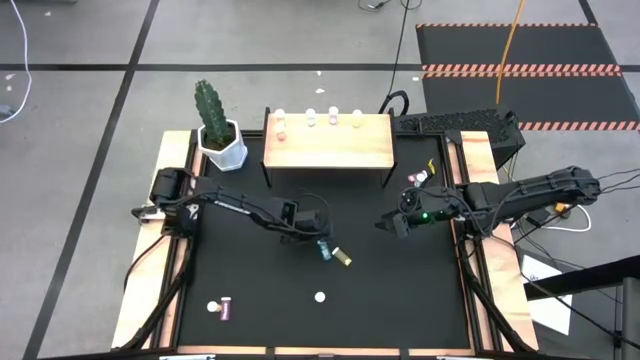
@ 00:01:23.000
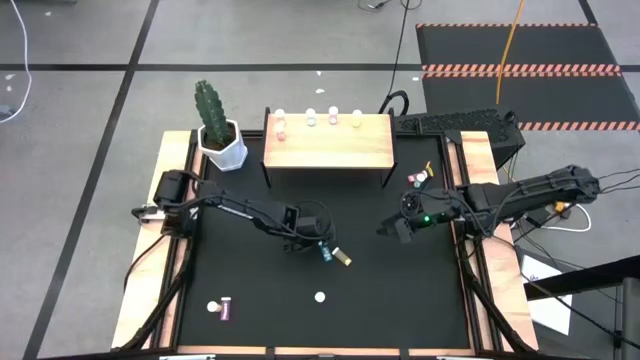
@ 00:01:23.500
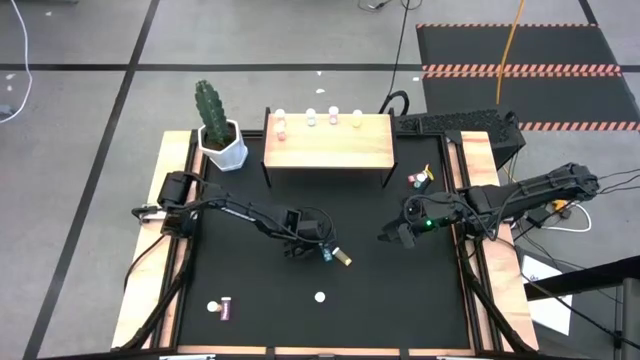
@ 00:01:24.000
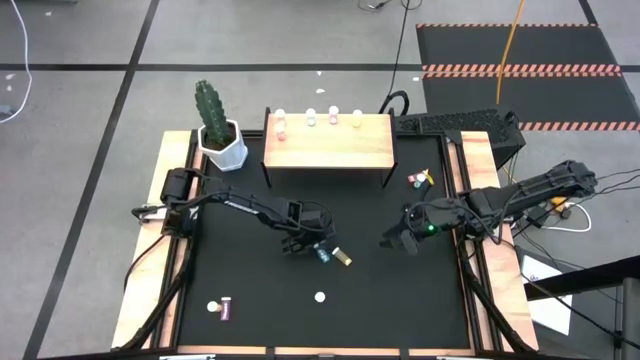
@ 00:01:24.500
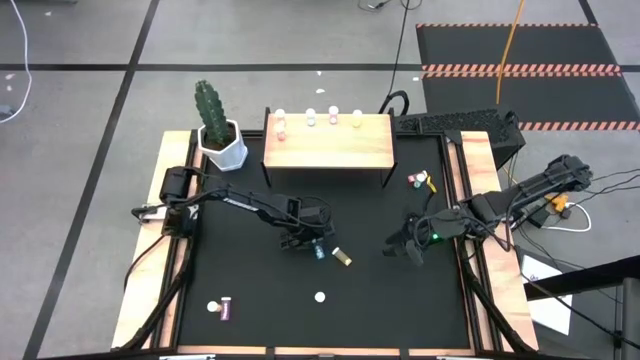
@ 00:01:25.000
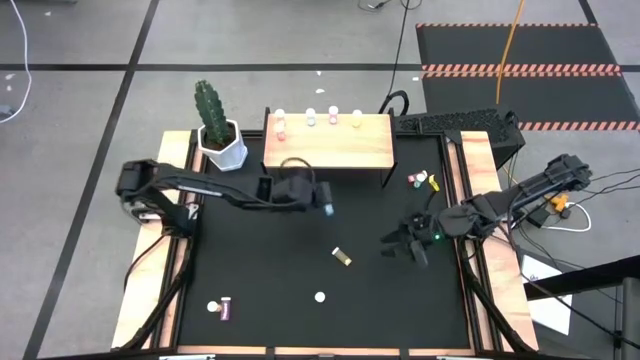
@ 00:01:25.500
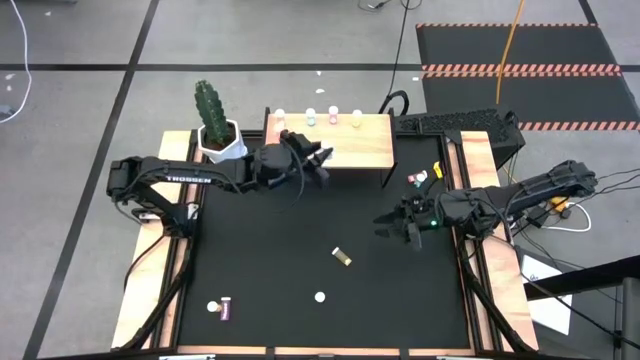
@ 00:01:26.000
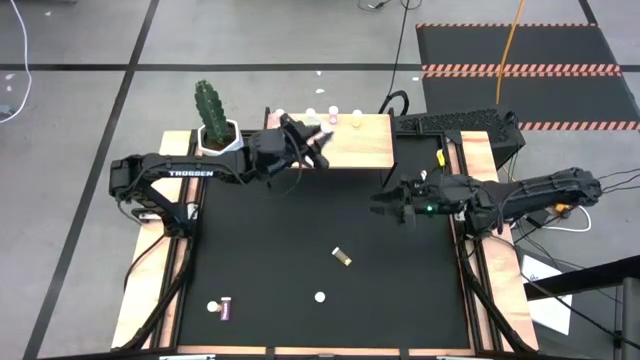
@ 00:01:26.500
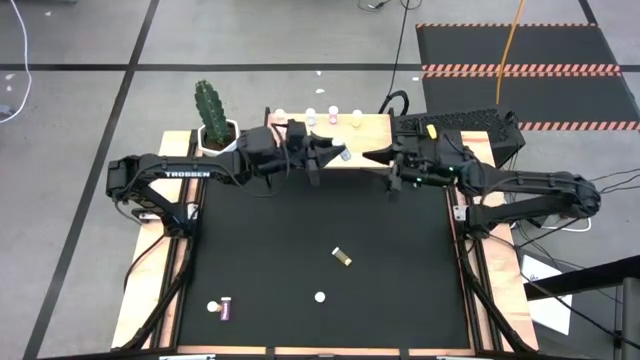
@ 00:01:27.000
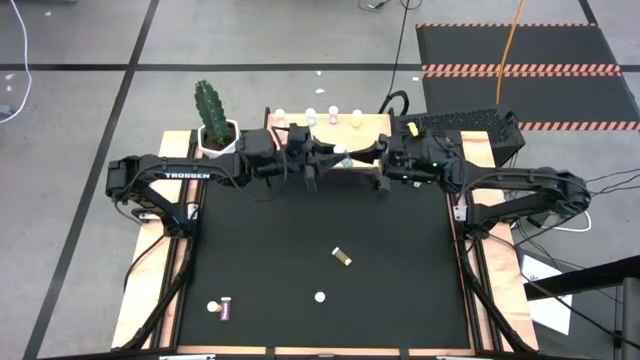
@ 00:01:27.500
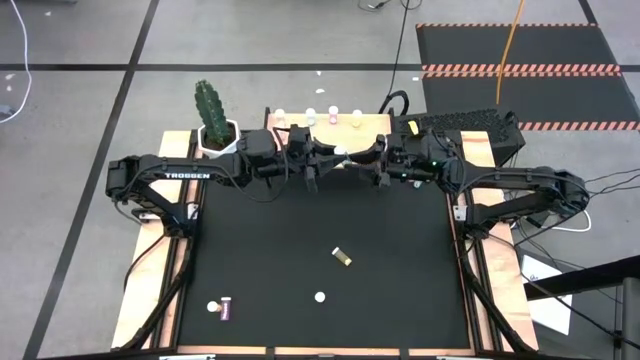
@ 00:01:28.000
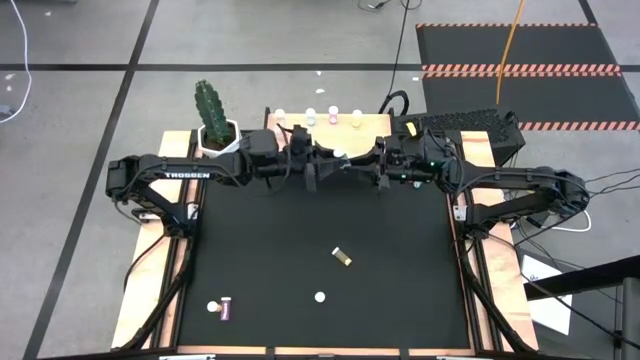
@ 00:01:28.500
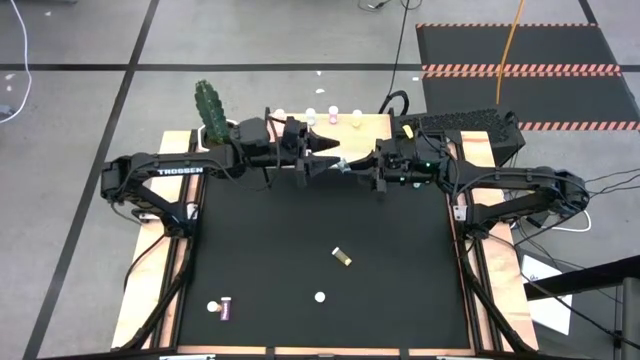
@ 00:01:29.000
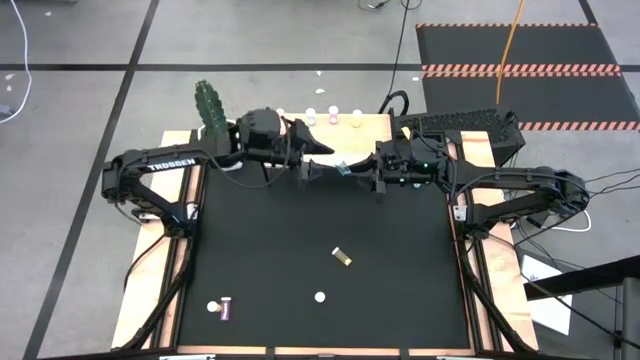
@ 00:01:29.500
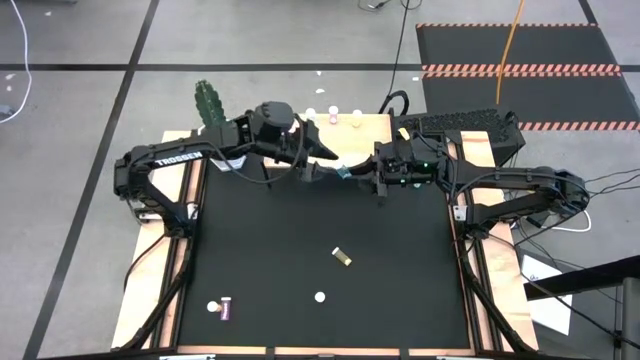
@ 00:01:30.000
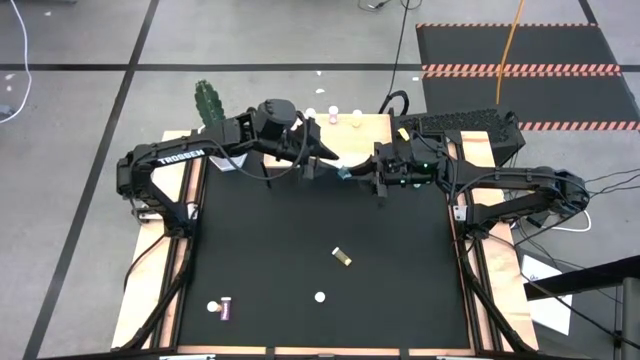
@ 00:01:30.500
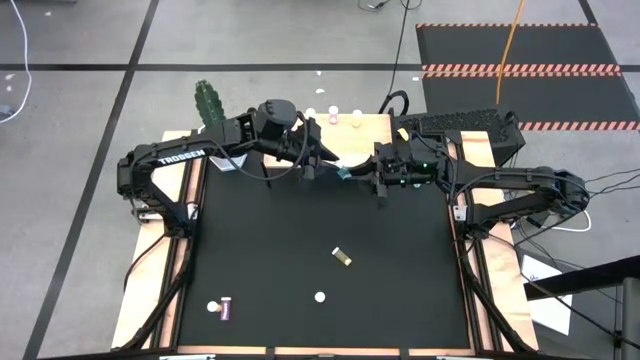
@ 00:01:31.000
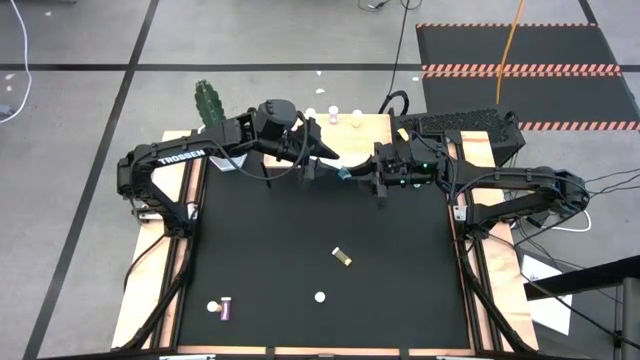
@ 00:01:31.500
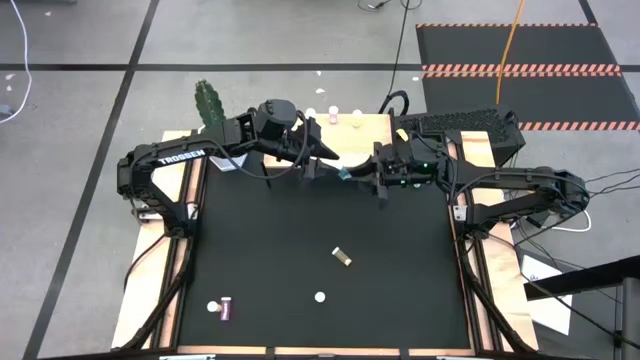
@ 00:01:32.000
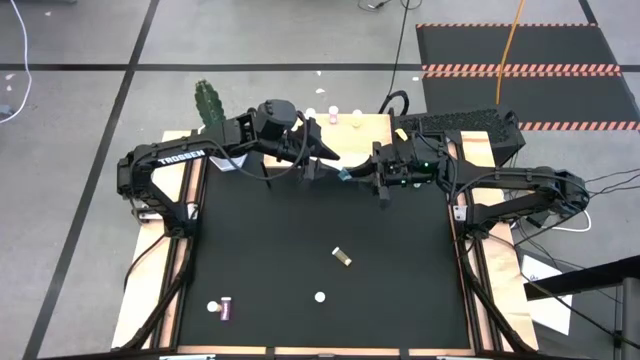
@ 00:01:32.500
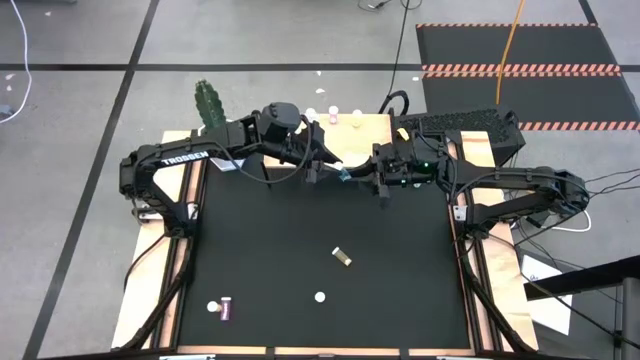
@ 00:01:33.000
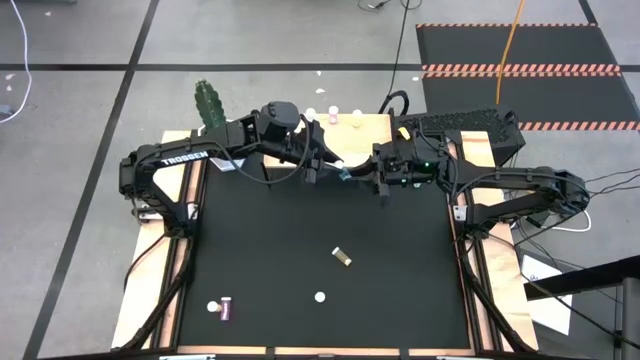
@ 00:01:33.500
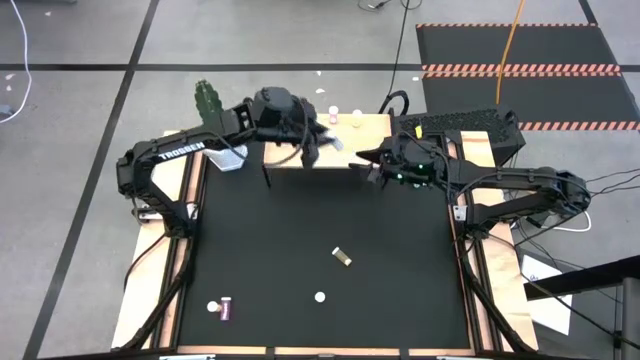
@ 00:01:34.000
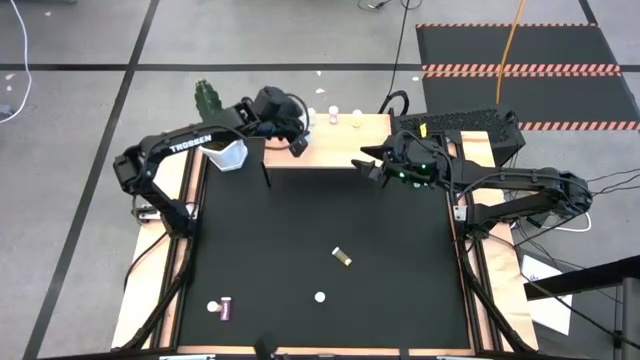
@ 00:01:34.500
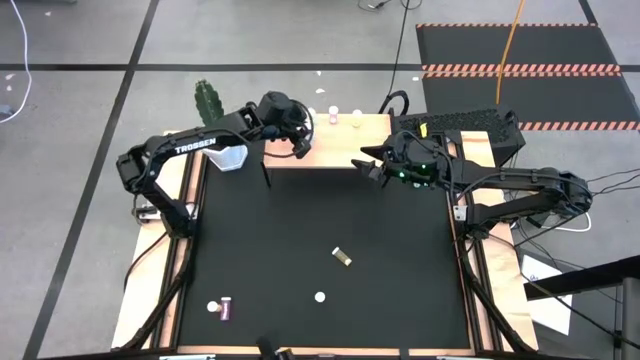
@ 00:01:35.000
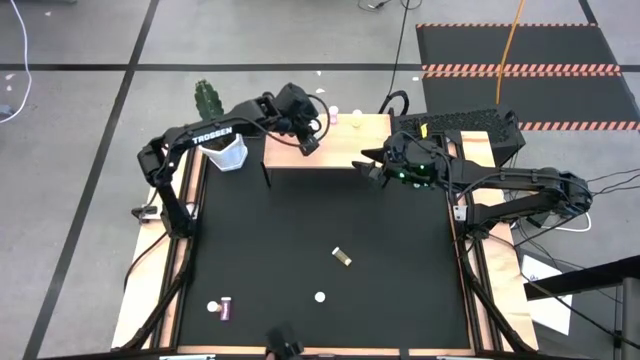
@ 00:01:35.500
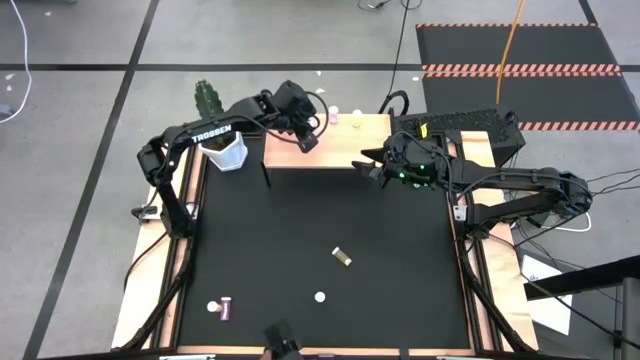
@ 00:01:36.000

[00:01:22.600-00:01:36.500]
Task: Pick and place medicine bottles onto shelf by color
Put the bottom blue pill bottle aligned with the other blue pill bottle on the shelf

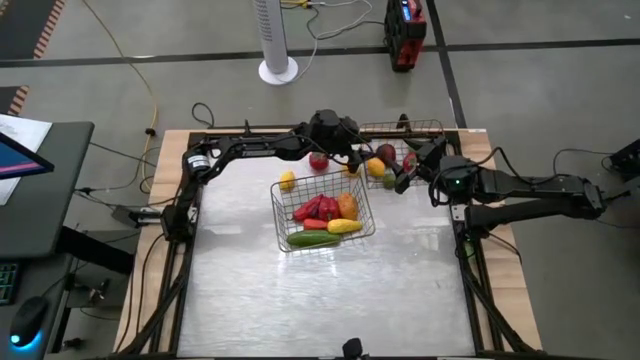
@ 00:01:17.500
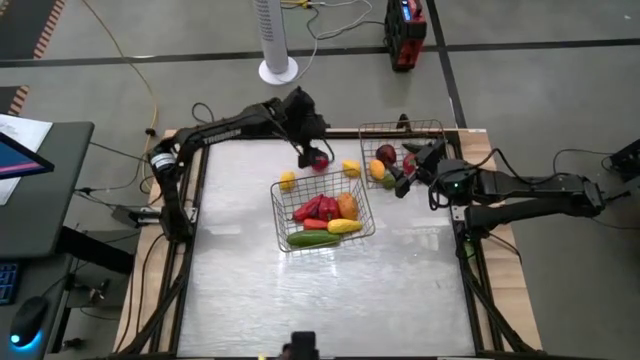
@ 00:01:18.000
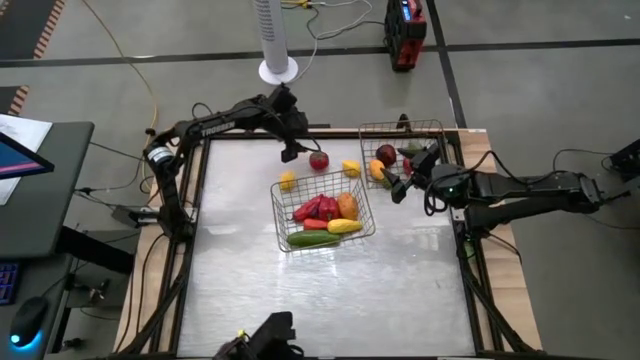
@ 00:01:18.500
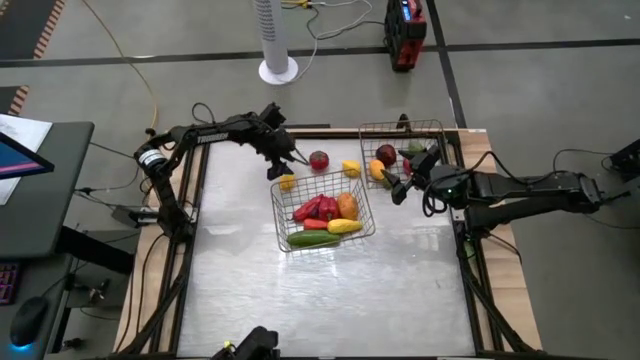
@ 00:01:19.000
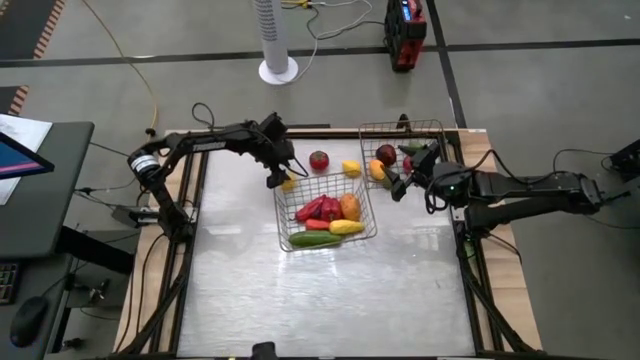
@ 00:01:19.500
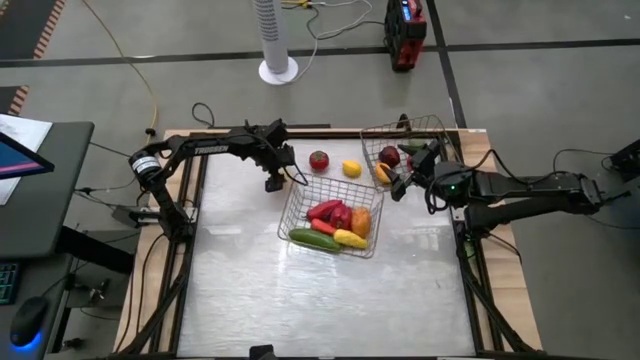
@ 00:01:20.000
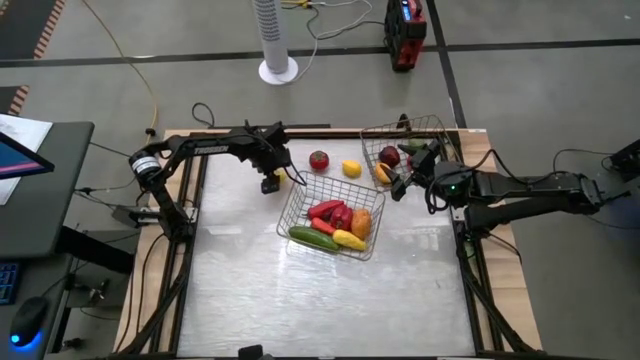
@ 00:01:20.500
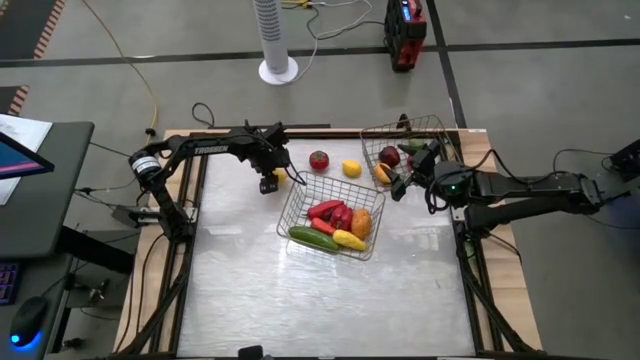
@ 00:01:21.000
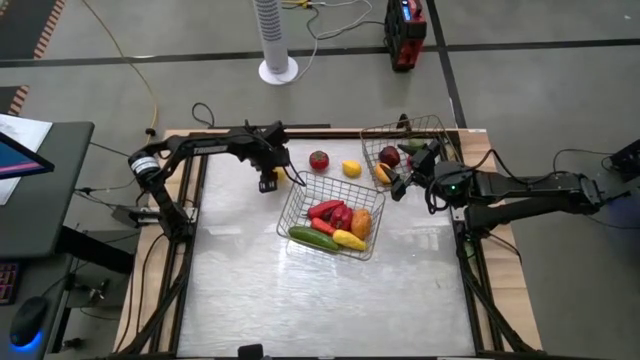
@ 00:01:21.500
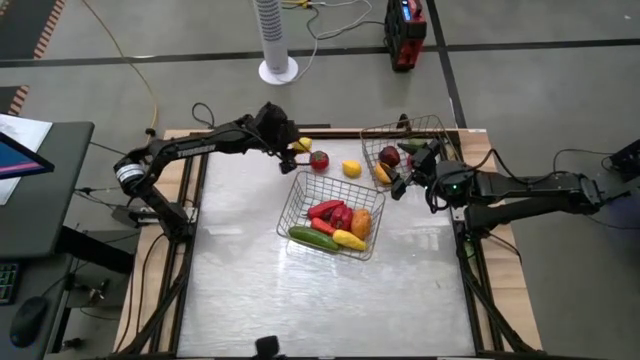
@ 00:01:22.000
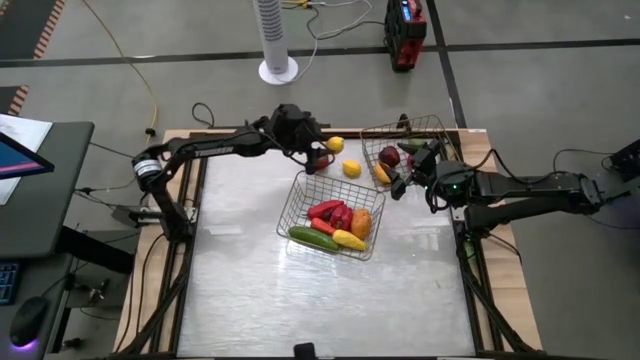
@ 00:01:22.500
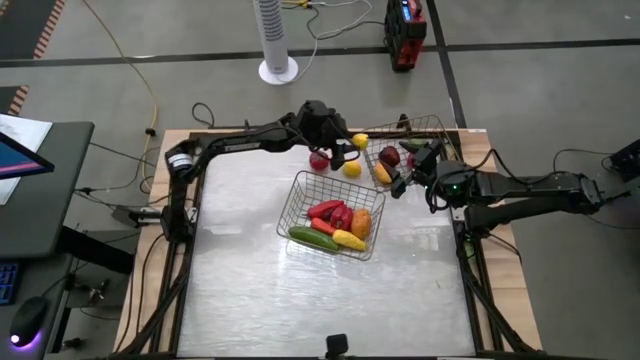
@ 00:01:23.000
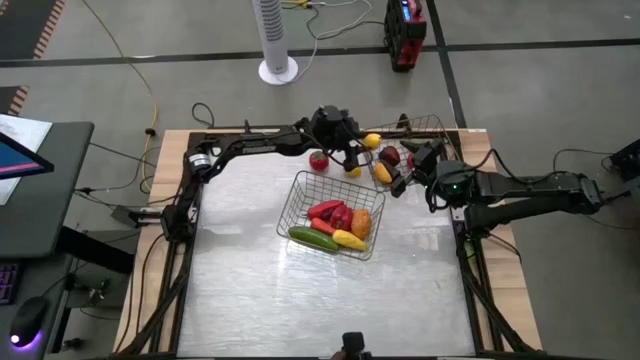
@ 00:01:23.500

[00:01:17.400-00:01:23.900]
Task: Sort produce into baskets
Put the yellow lemon into the right wire basket
